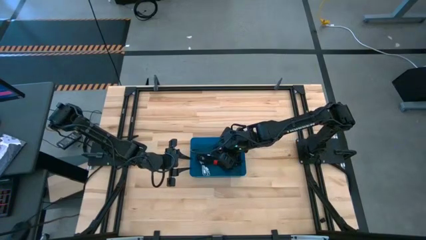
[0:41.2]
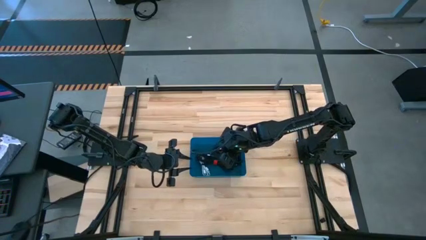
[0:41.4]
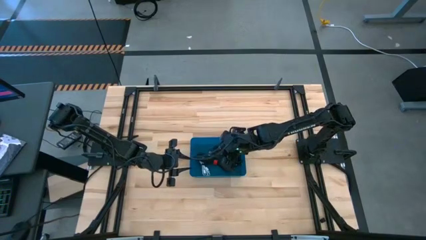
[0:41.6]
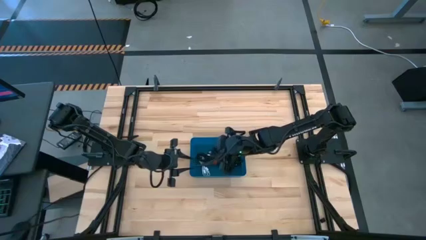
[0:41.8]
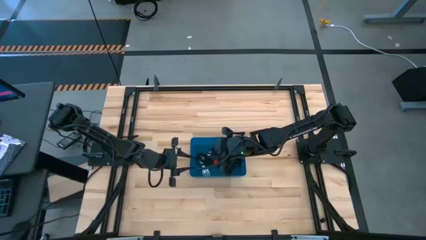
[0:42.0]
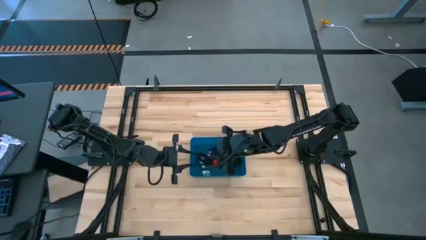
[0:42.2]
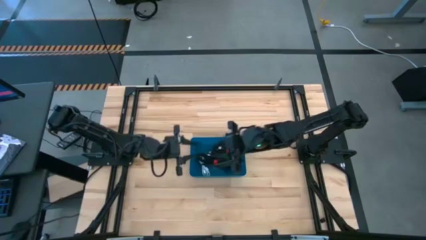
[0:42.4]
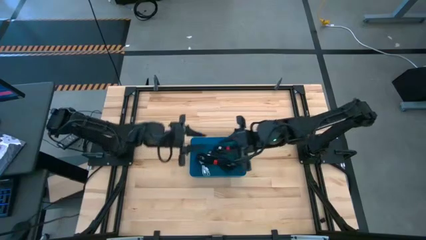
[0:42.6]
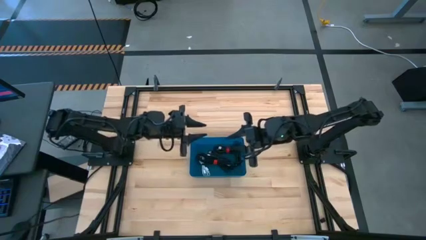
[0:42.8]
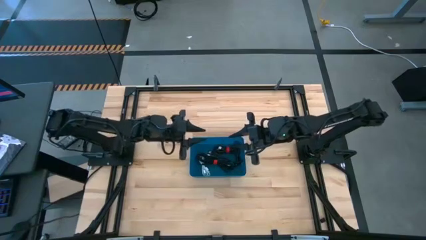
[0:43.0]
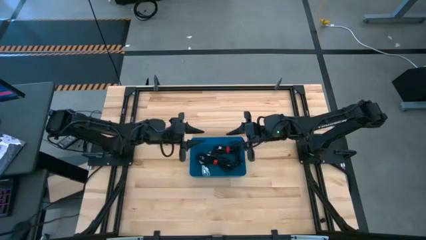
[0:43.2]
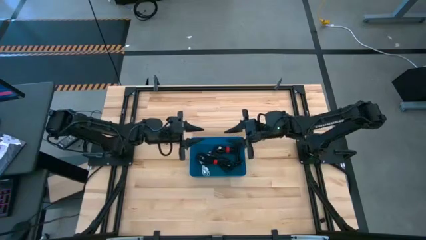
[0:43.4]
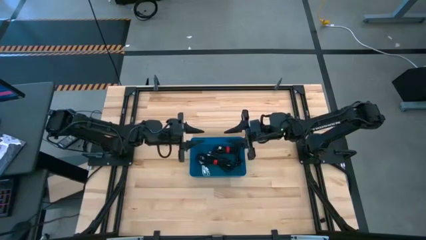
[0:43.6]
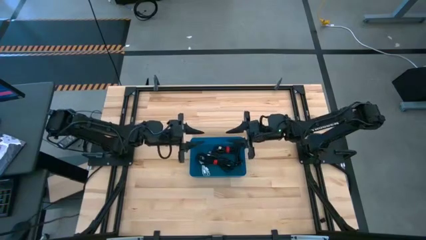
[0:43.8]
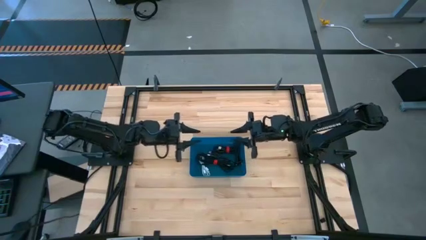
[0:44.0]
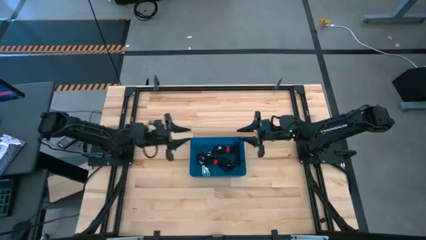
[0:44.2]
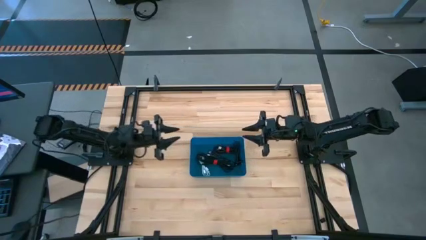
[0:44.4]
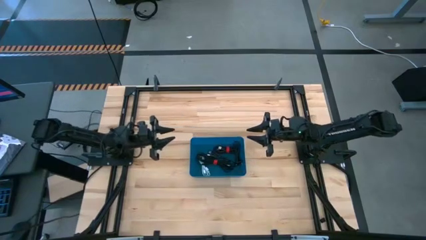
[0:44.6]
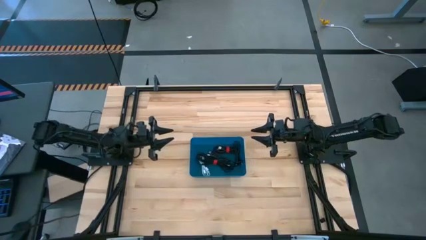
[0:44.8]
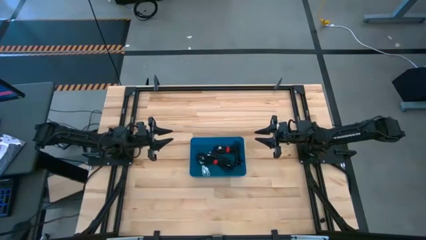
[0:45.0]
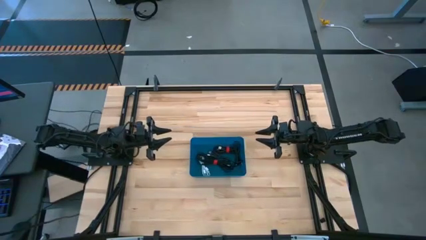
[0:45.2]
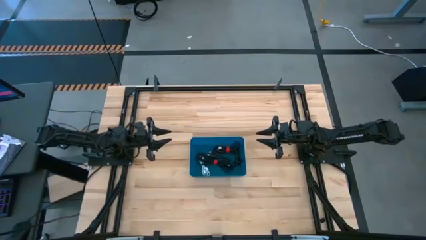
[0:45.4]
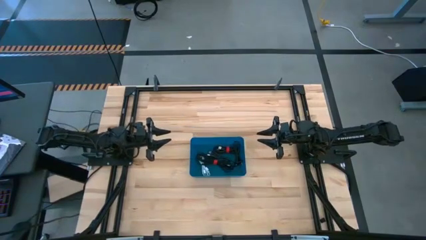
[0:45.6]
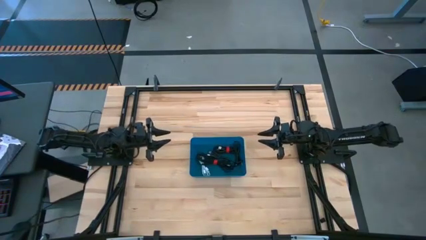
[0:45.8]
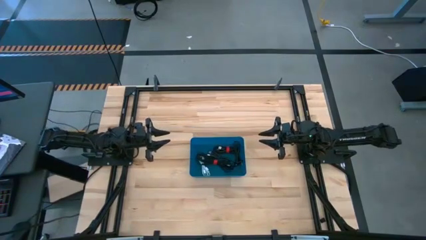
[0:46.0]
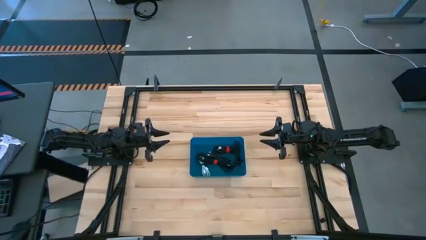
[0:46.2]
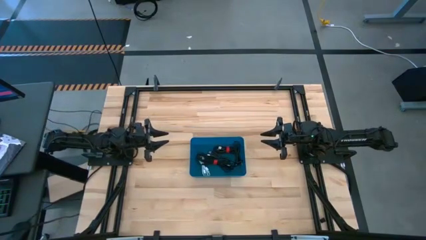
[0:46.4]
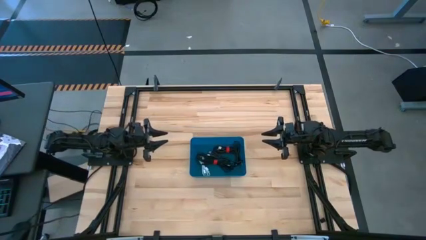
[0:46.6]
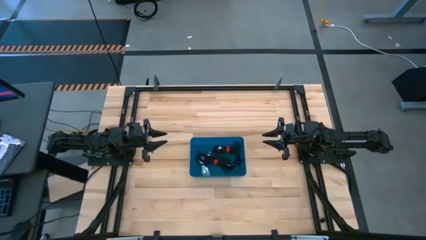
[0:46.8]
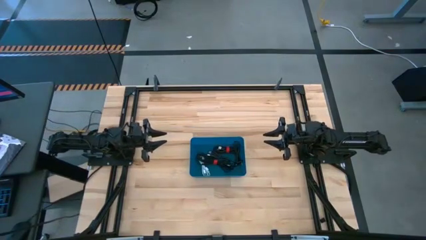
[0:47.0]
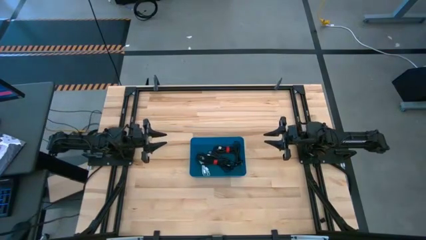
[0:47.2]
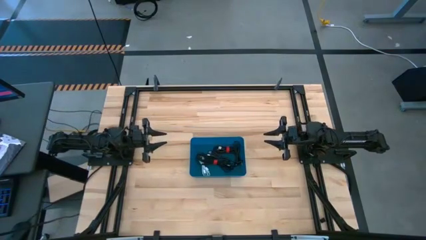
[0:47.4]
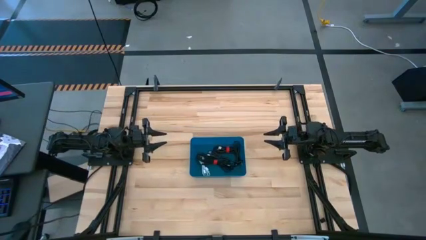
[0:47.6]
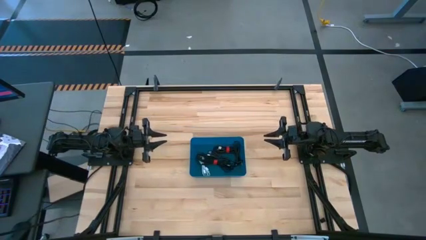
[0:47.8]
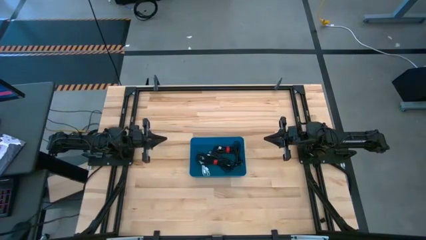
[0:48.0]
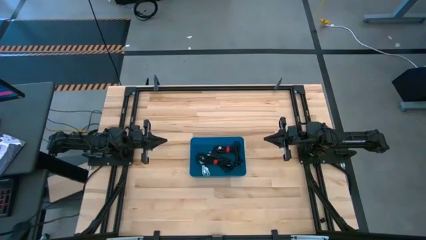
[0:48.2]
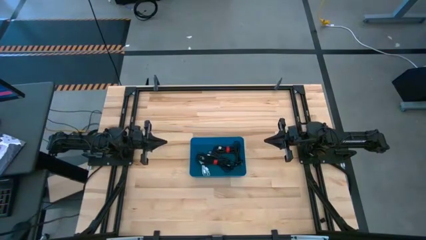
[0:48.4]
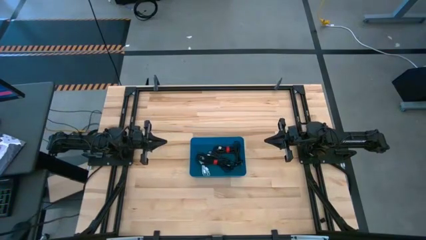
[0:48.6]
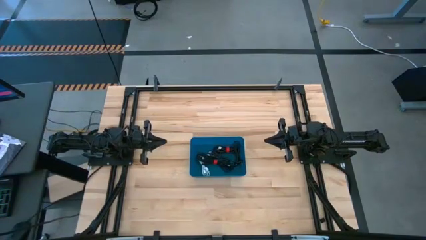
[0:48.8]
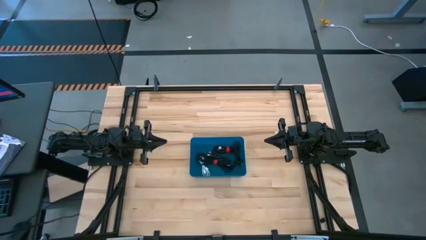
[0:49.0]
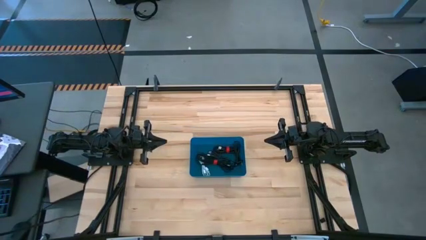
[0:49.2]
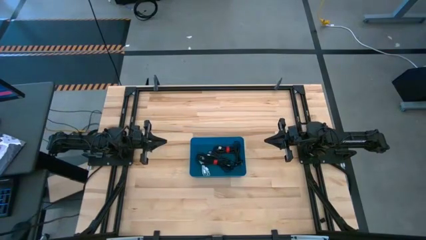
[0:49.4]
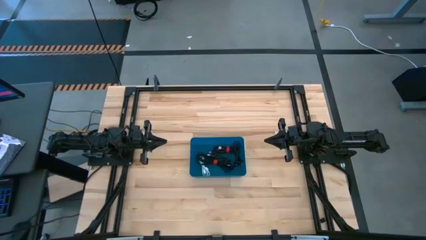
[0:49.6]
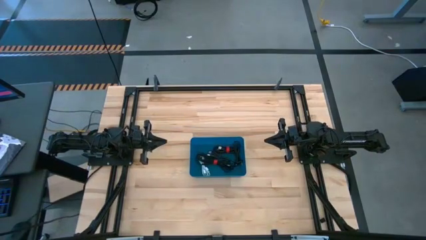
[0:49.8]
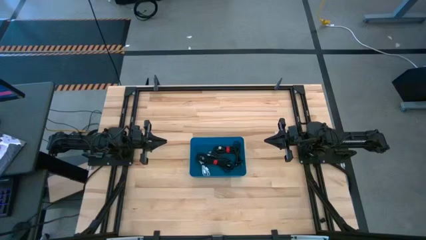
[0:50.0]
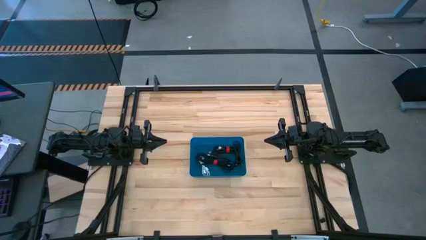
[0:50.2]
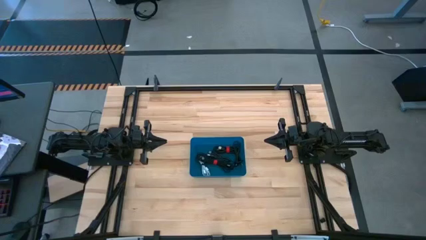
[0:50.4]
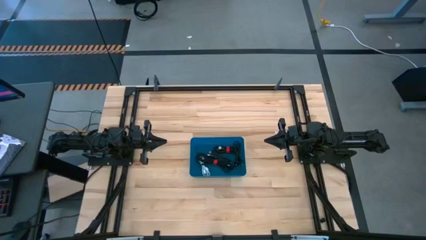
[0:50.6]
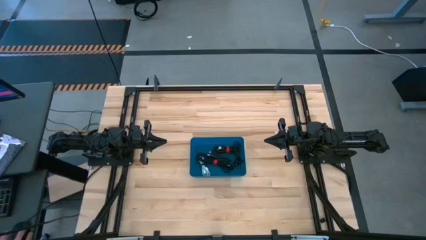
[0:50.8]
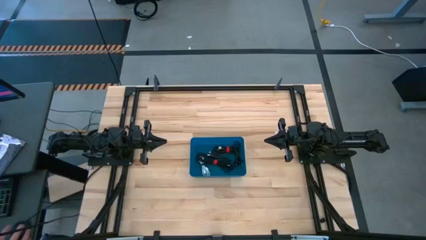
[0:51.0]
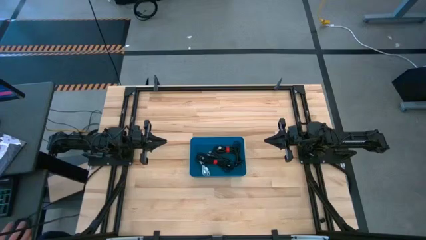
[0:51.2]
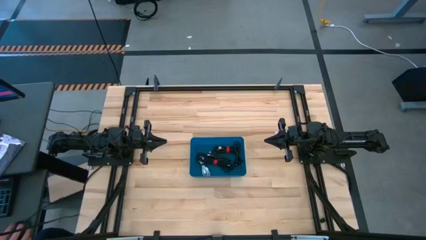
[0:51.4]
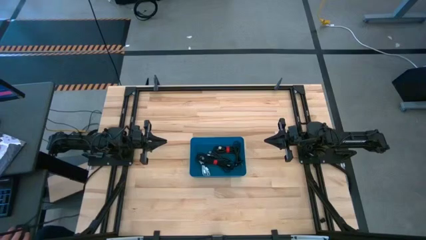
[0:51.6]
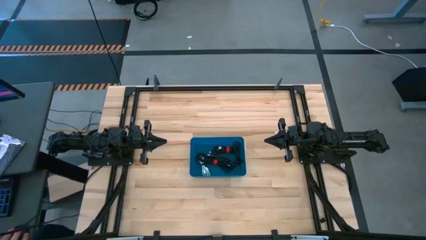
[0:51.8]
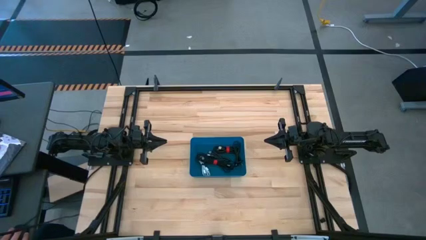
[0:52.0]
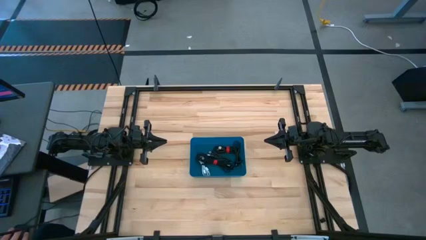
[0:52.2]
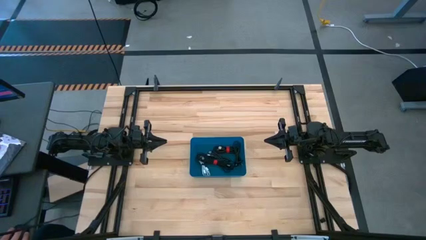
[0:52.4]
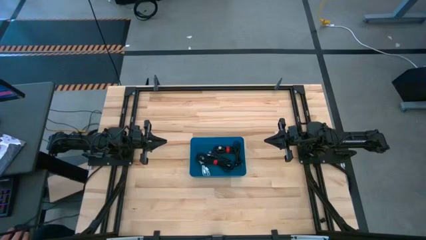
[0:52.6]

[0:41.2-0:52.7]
Task: Pick and place USB-C Cables
Return to Home Position
